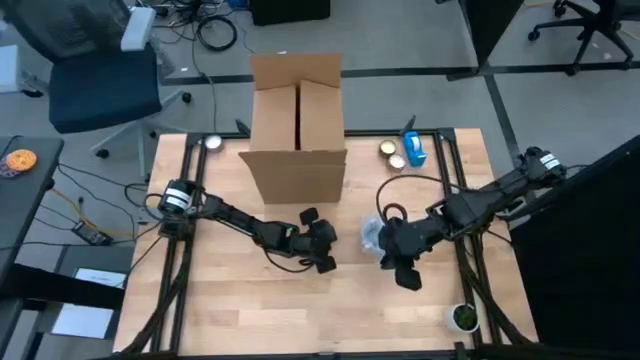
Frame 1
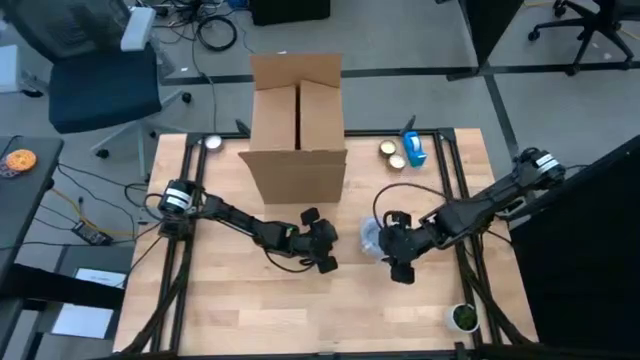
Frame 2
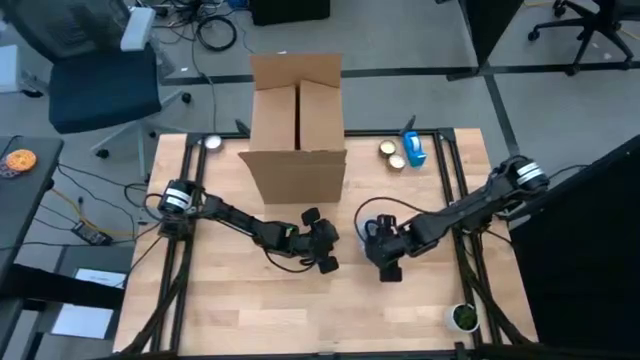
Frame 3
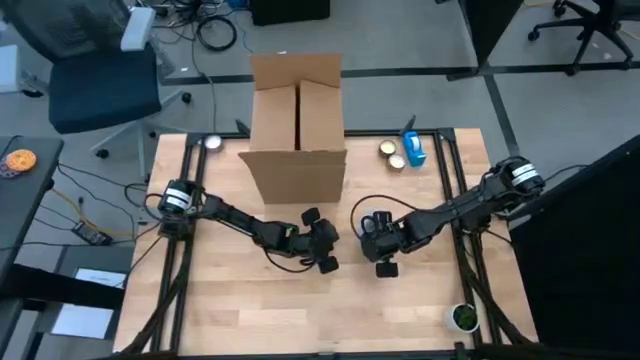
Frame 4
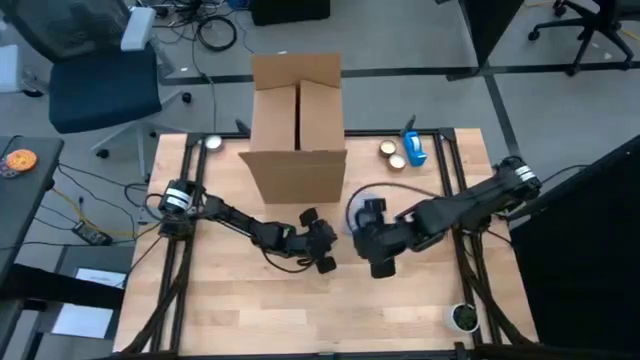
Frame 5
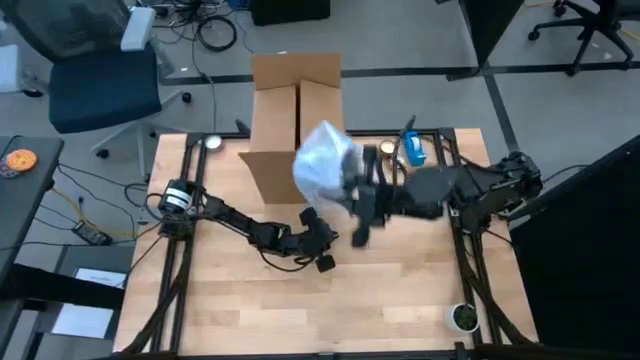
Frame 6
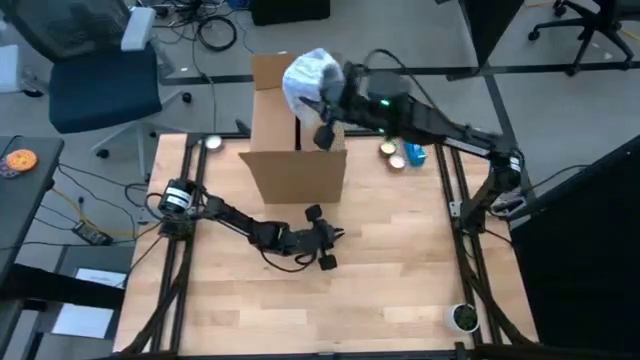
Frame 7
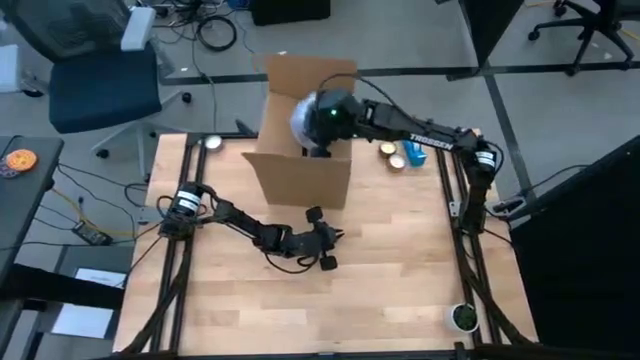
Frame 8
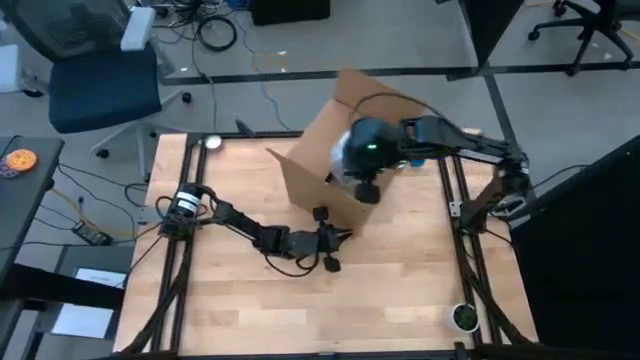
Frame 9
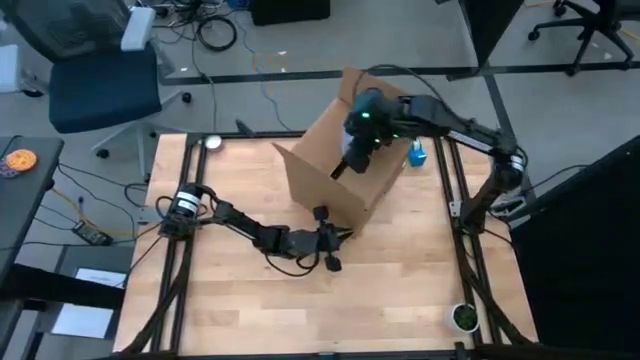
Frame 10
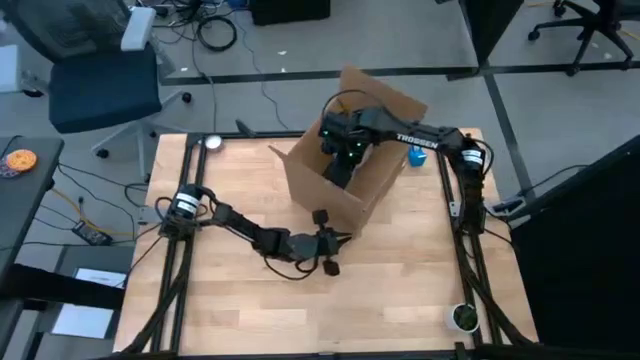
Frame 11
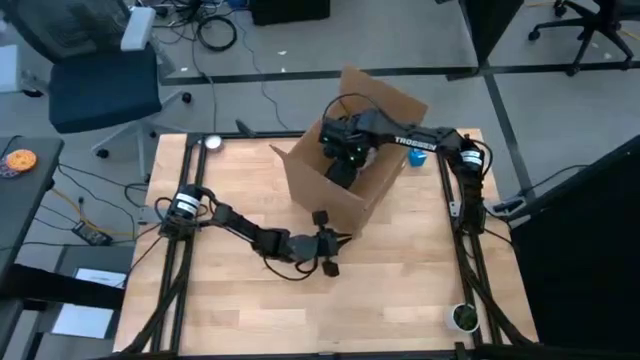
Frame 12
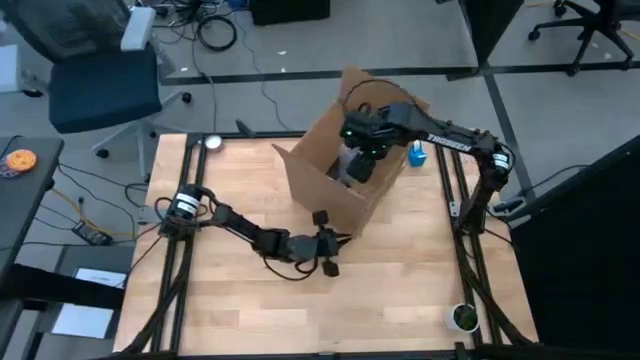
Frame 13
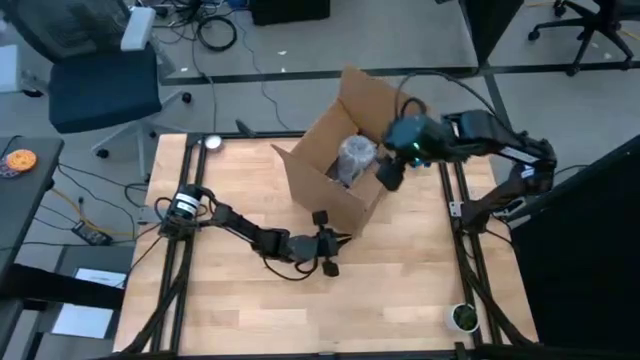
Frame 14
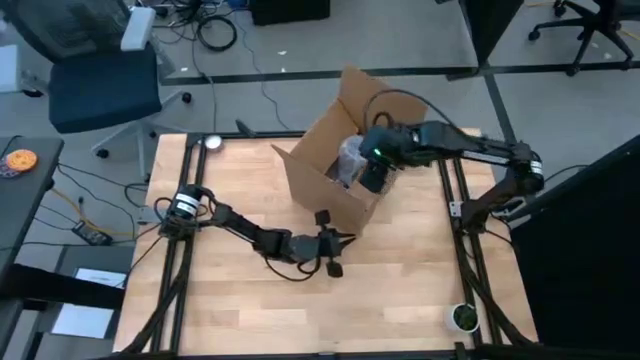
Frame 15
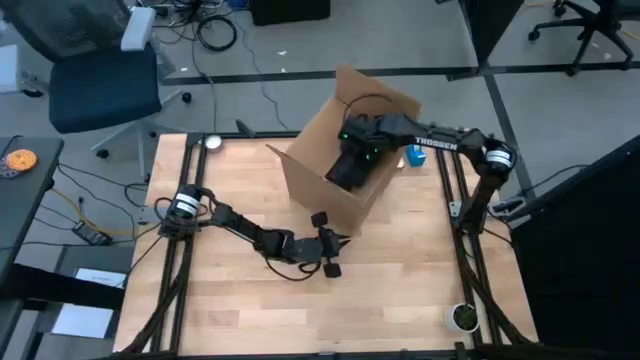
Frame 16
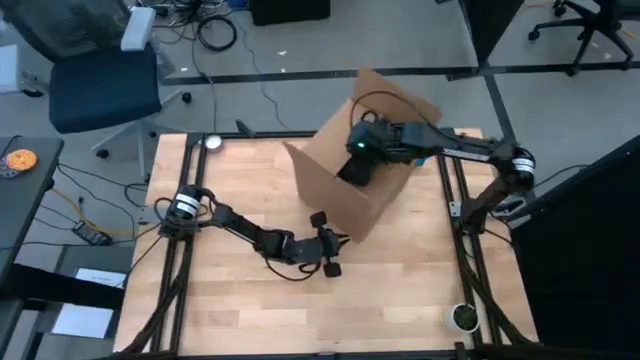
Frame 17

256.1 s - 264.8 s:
Task: wrap mug
Put the wrapped blue mug into the box

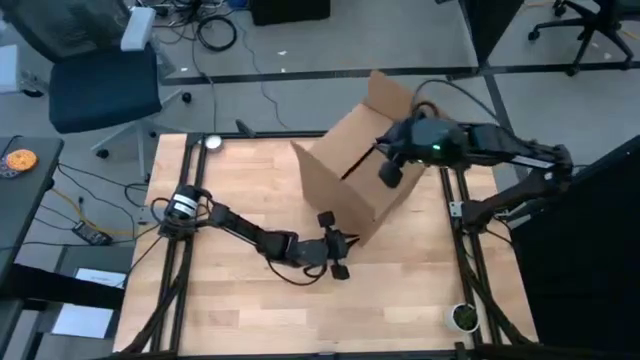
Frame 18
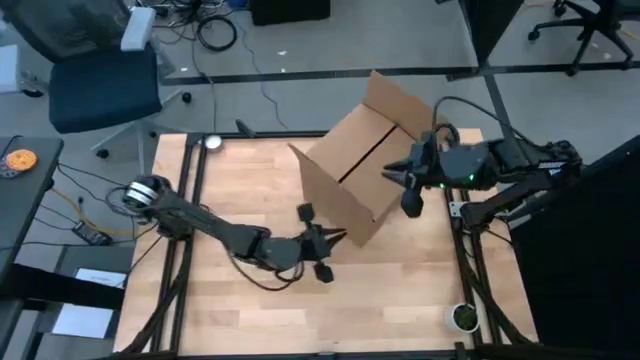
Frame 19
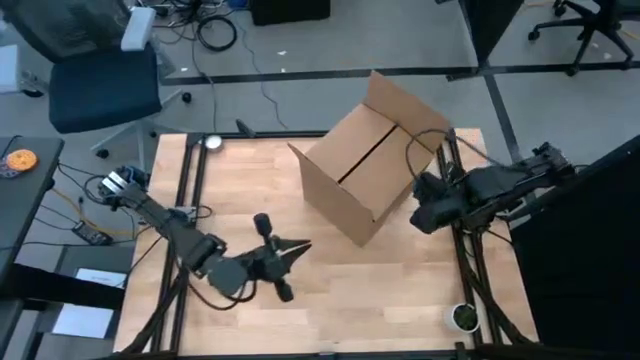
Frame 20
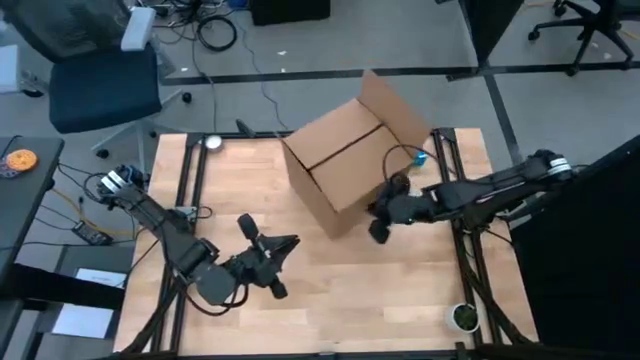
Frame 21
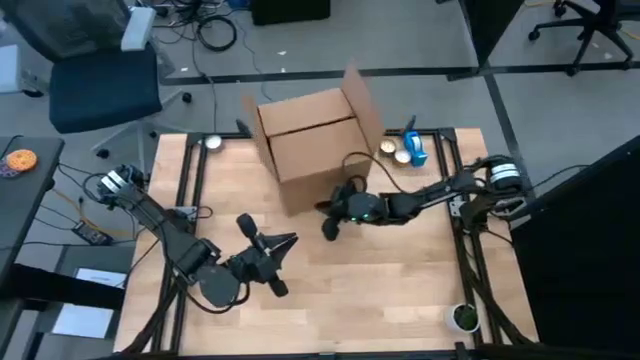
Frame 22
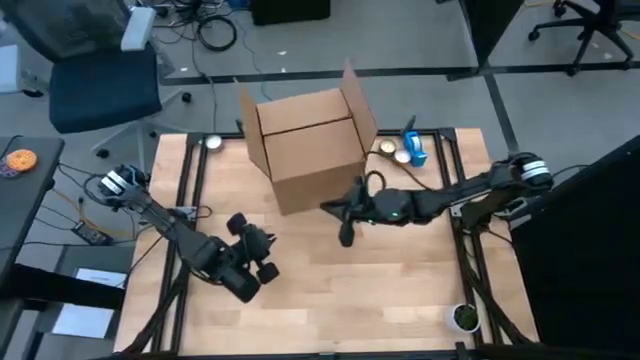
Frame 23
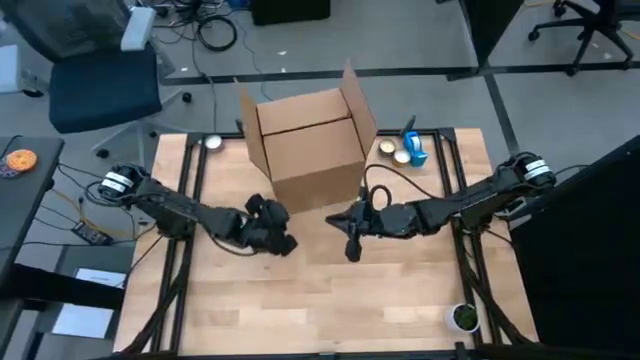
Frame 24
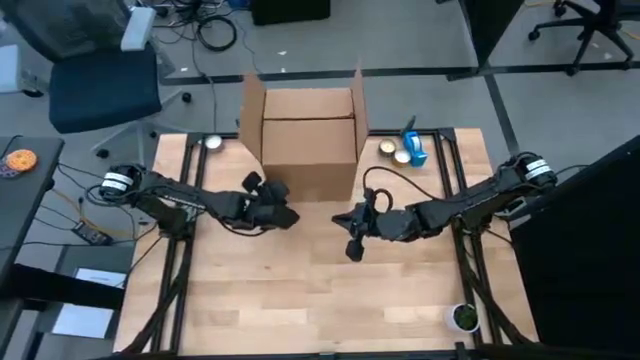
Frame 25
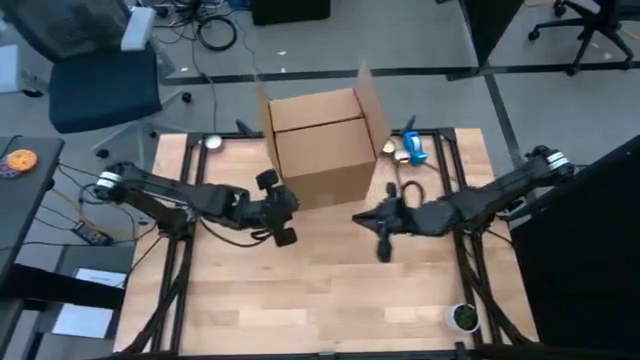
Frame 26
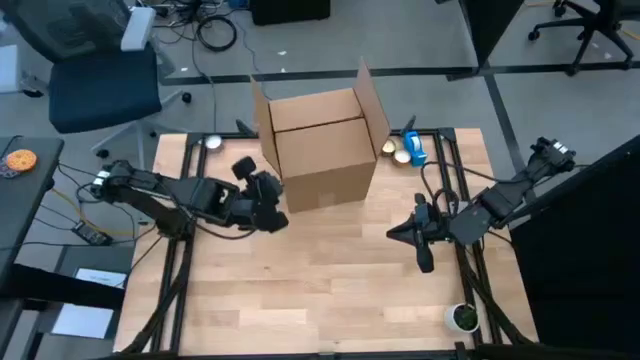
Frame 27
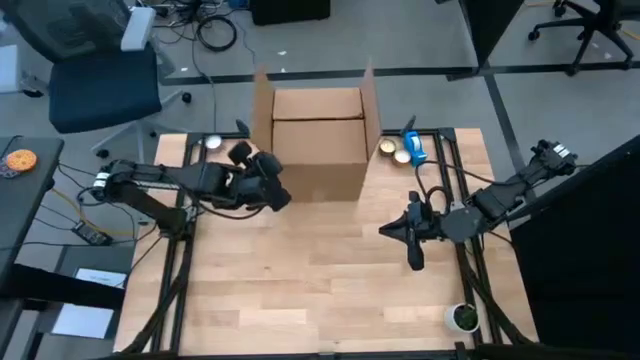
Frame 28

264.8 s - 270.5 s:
Adjust the box

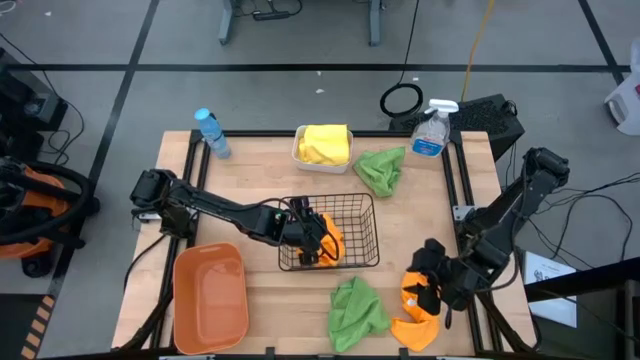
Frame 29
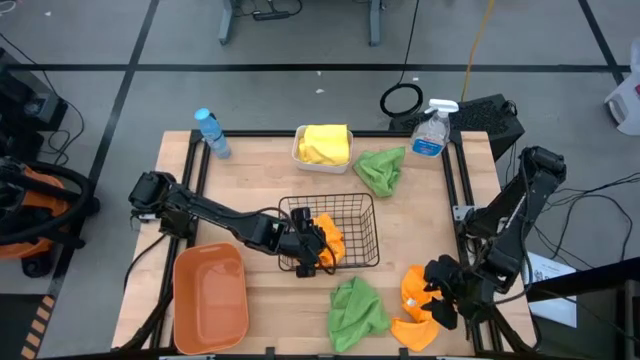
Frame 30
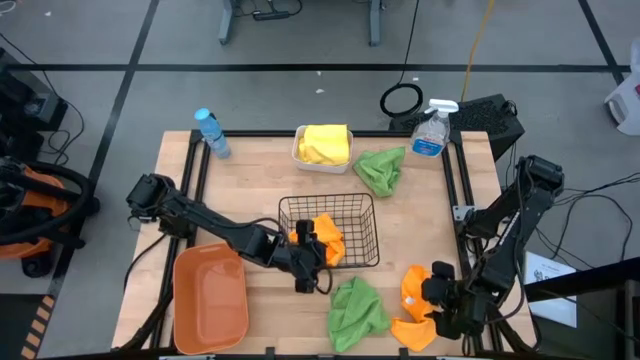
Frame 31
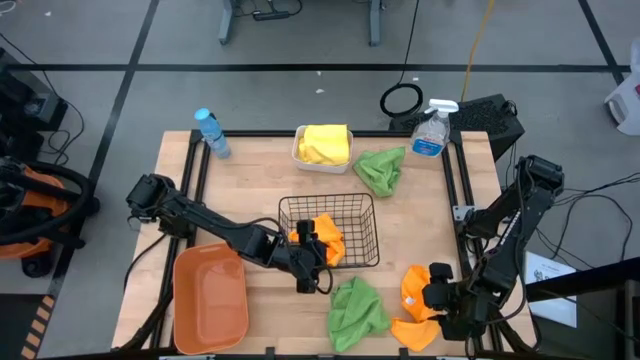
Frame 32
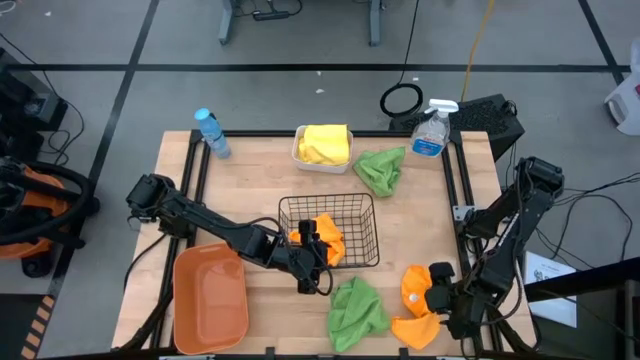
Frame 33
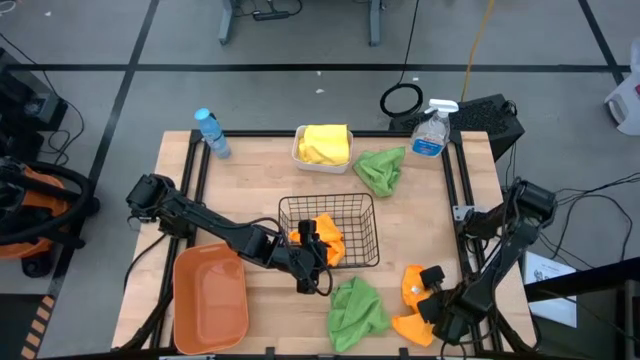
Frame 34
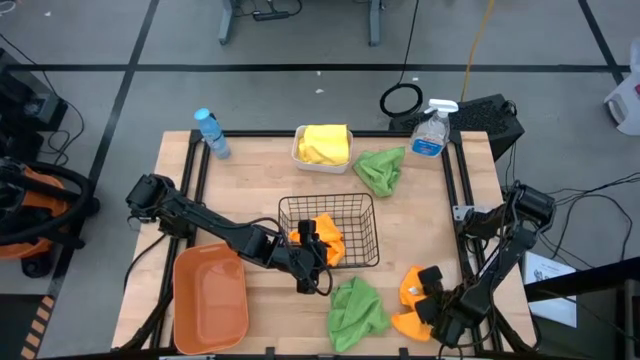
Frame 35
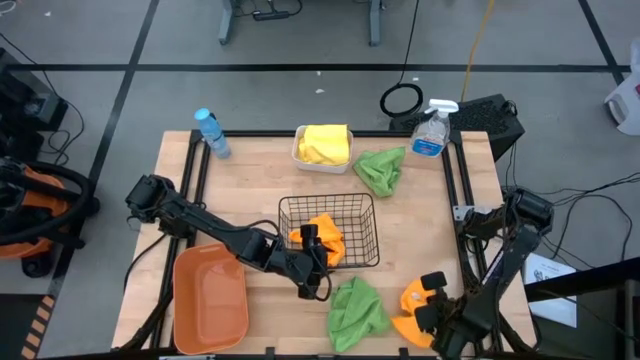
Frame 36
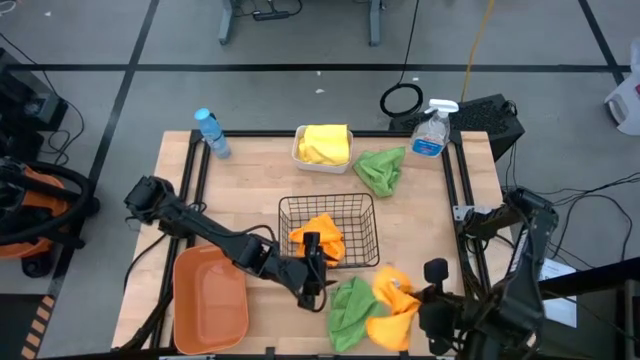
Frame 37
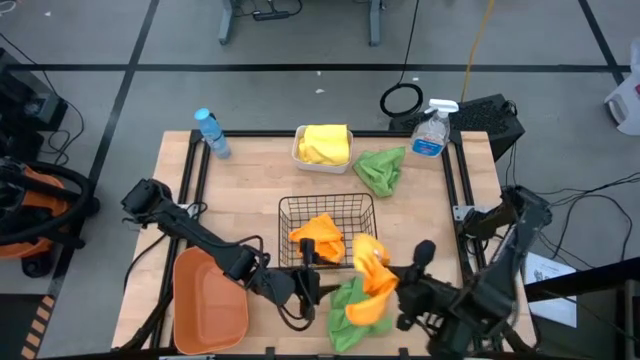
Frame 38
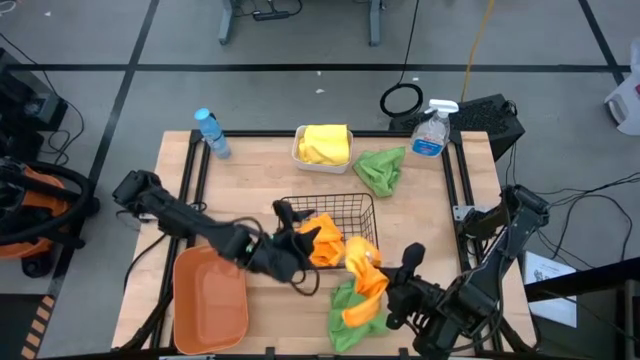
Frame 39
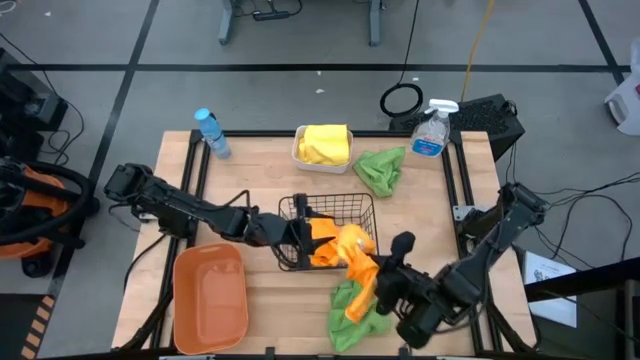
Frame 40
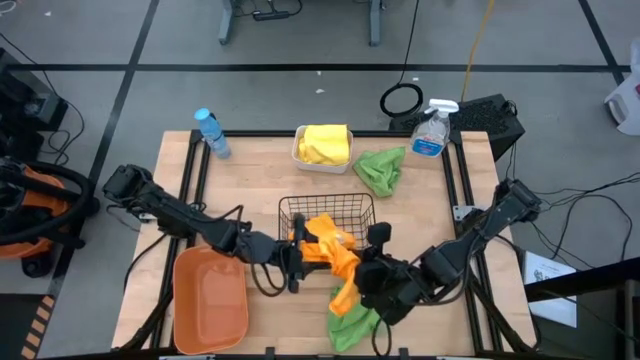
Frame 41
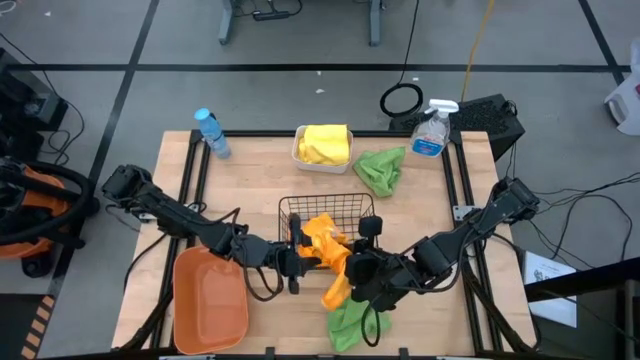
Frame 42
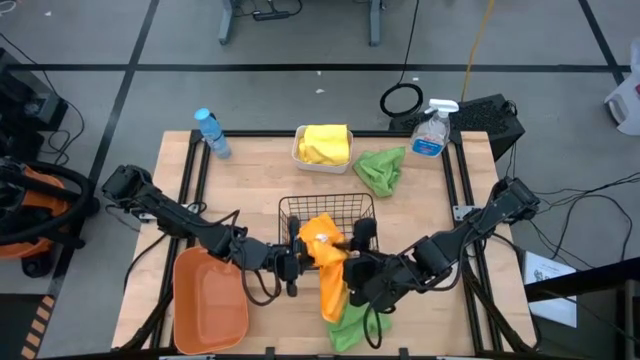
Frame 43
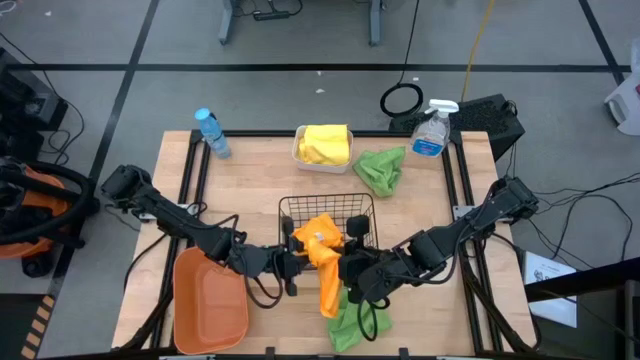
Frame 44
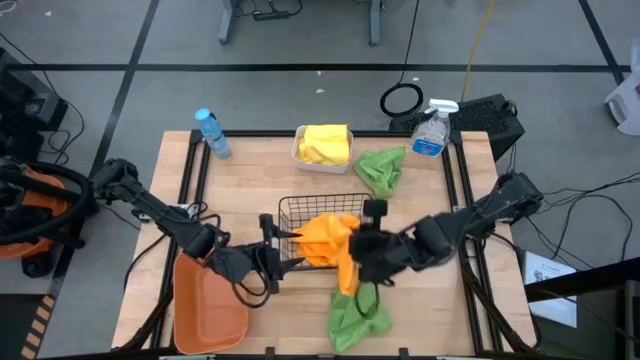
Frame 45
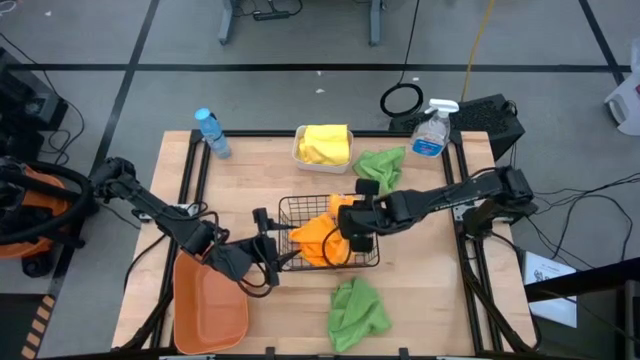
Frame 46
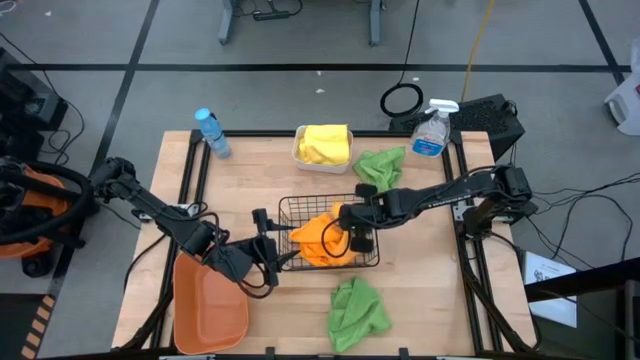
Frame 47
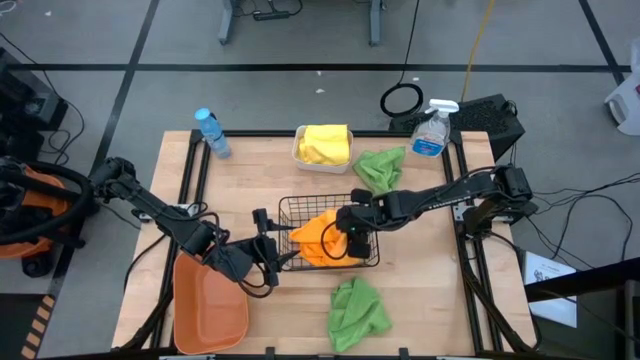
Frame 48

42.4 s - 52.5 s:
Task: Sort microfiber towel by color & place in baskets
Put the orange microfiber cloth into the black wire basket
